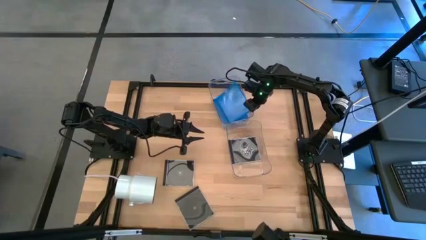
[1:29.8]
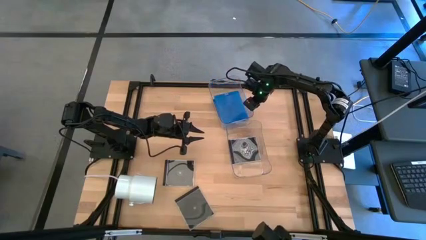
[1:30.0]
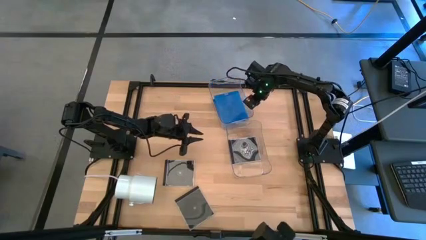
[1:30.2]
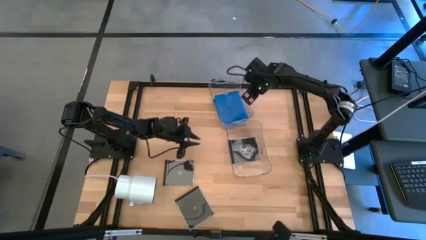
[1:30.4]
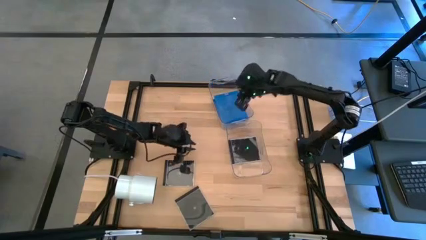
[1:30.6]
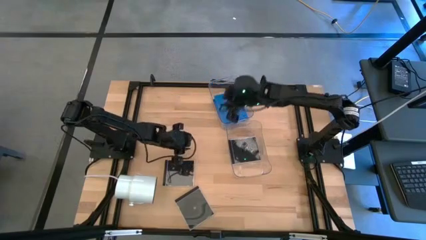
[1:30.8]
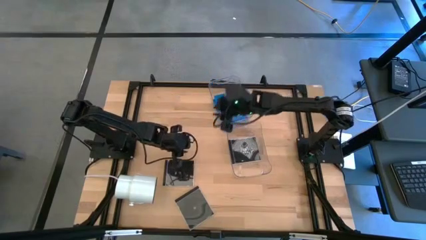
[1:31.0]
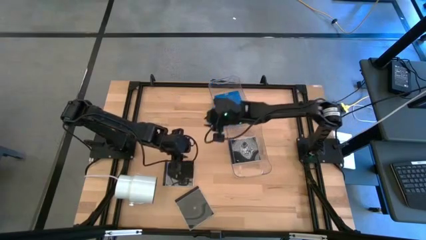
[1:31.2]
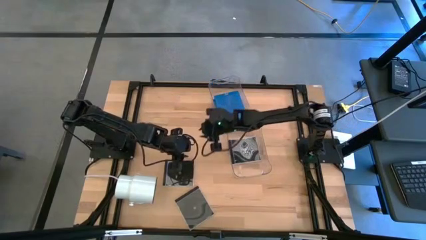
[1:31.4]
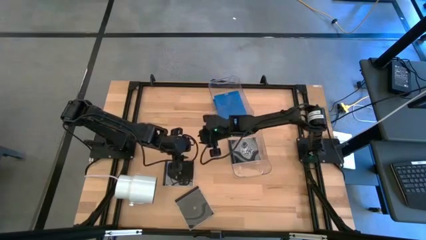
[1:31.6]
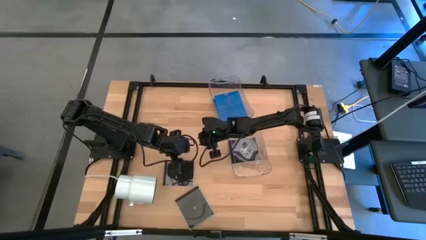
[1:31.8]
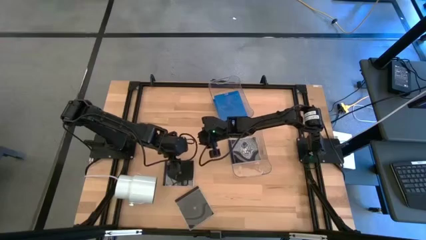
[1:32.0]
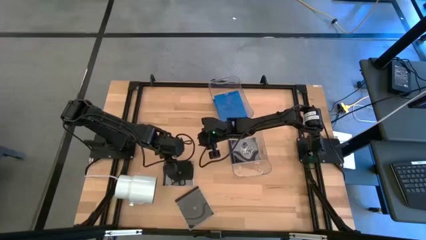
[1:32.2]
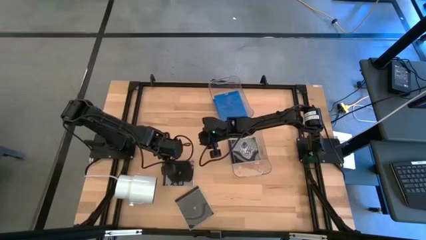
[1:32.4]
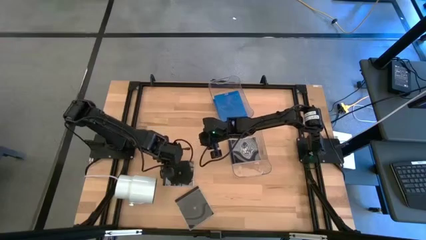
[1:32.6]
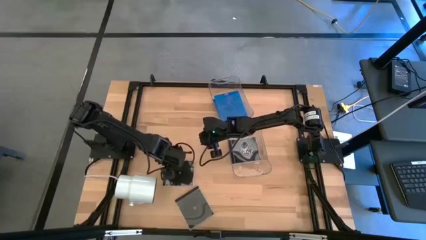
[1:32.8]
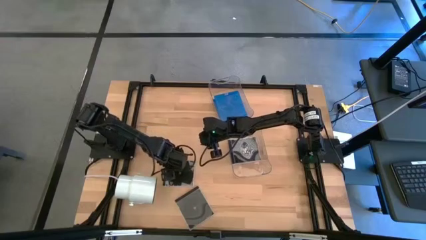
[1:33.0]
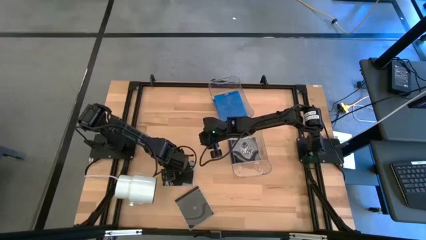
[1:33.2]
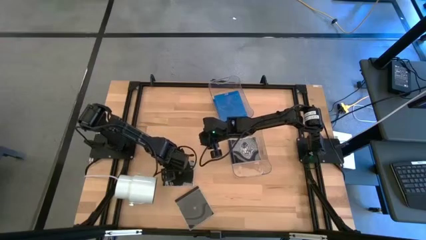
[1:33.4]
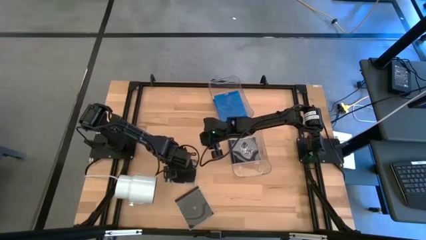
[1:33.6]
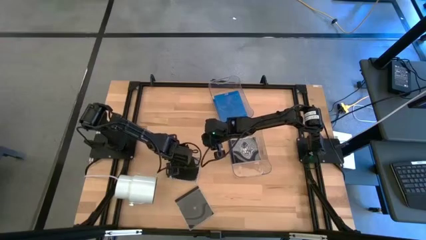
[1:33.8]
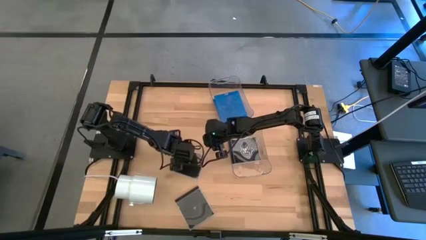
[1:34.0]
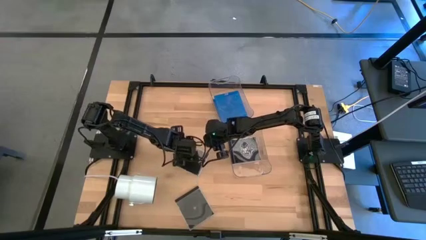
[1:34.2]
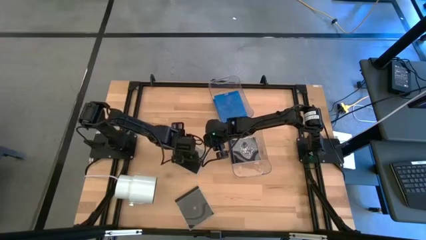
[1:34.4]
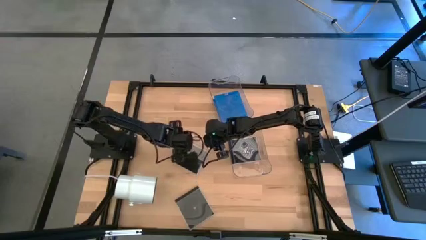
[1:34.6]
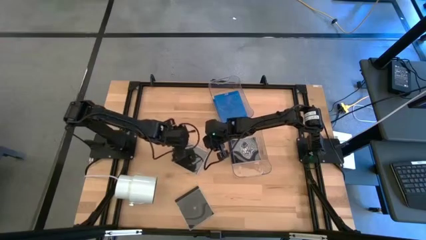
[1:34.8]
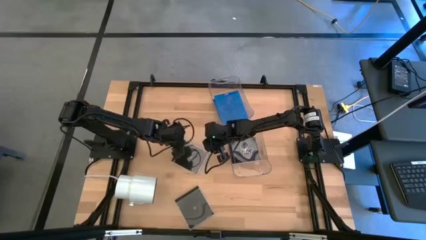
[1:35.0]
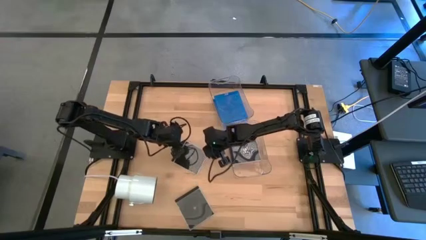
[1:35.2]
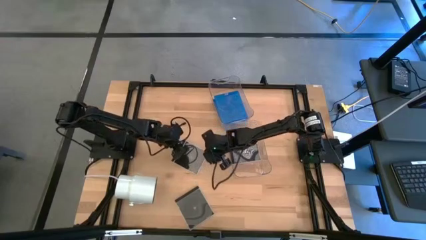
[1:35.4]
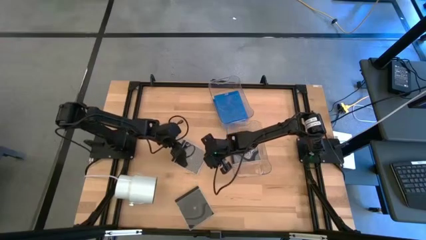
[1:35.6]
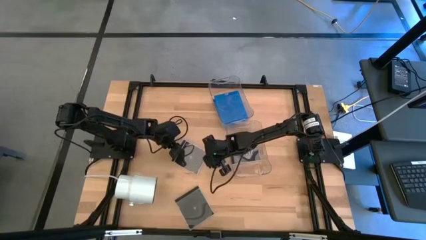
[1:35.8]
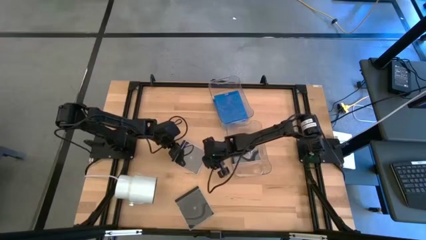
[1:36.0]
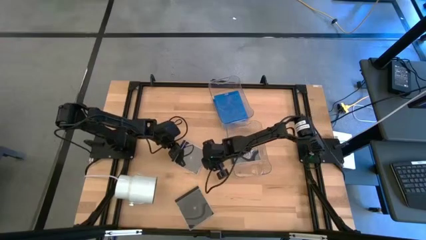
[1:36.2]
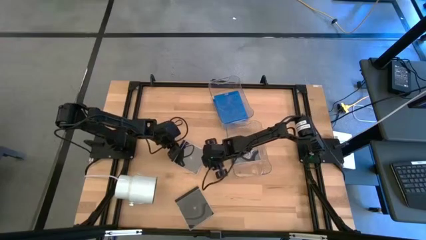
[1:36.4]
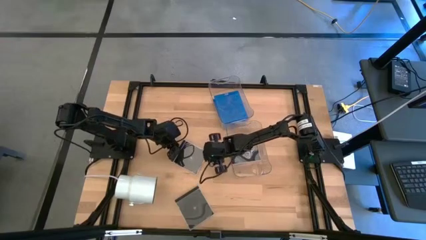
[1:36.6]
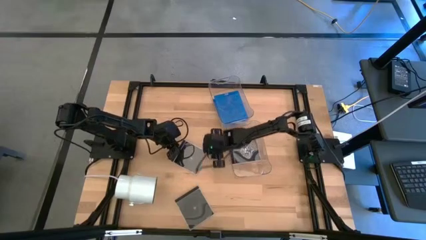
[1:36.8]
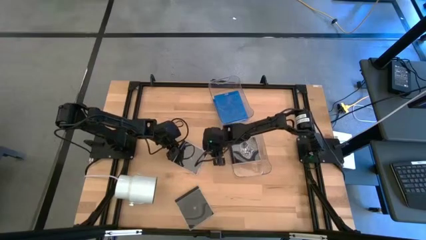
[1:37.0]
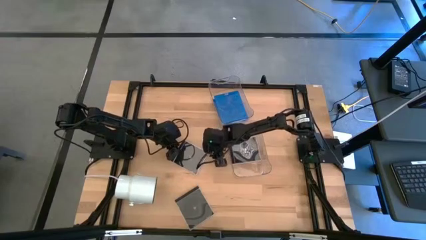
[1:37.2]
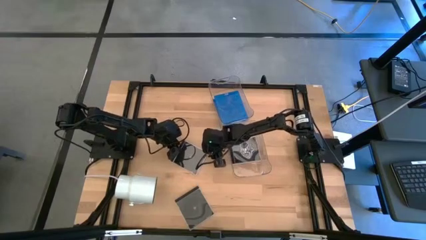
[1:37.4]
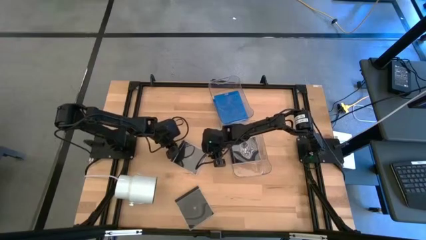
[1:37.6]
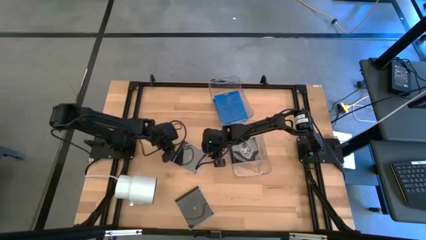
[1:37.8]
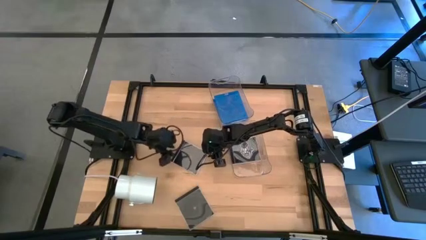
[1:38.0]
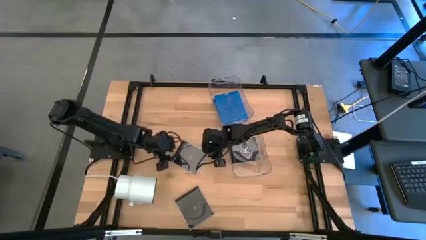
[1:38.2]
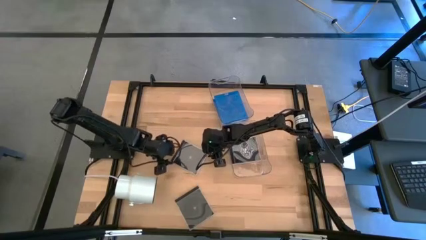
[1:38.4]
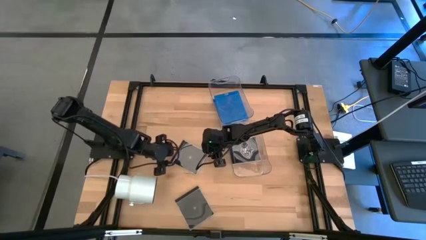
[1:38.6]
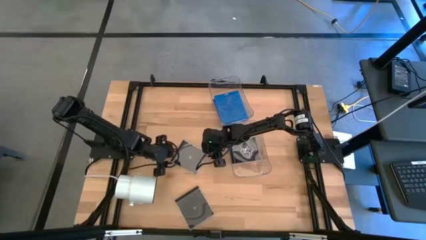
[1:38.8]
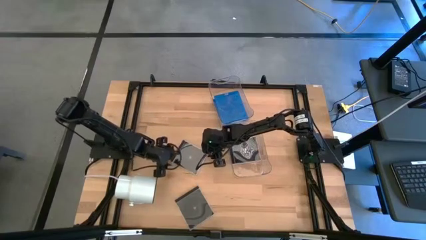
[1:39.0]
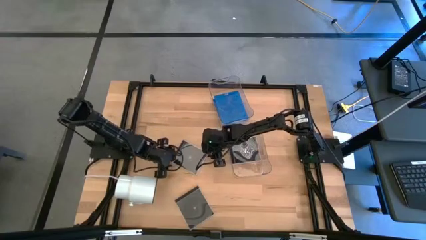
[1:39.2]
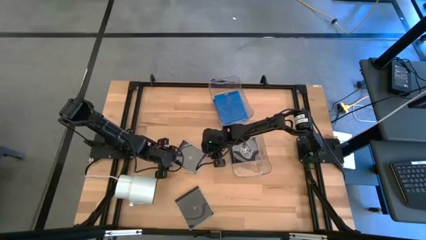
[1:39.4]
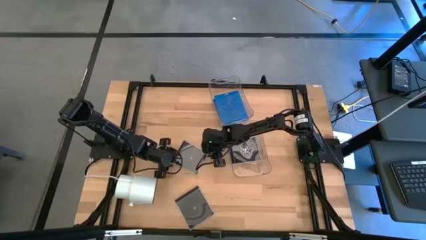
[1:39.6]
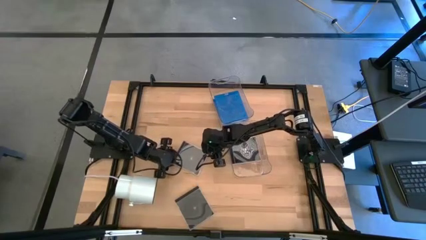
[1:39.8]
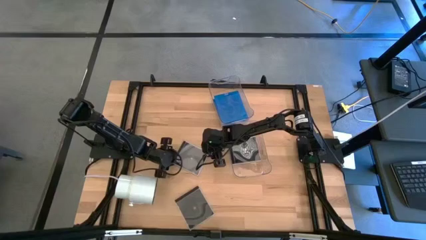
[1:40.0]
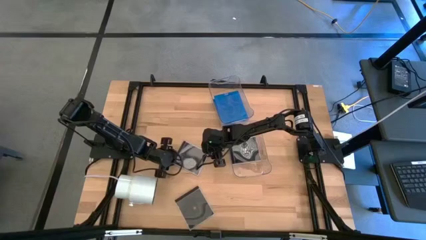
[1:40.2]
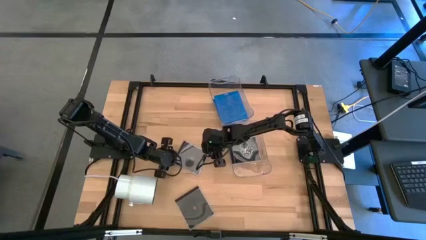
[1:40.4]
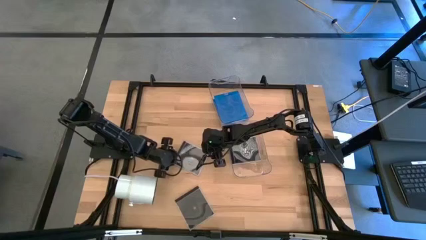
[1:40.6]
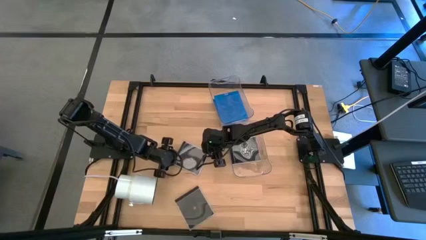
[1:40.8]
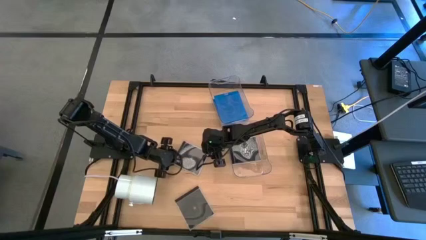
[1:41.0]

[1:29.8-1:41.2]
Task: Pick & place jewel cases by type
Put the top black CD case into the bottom transparent bin

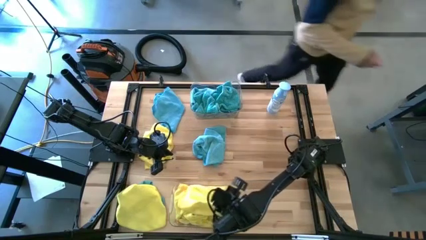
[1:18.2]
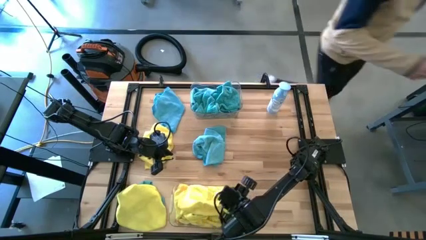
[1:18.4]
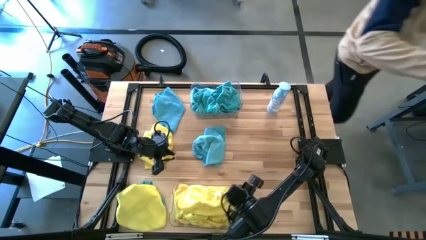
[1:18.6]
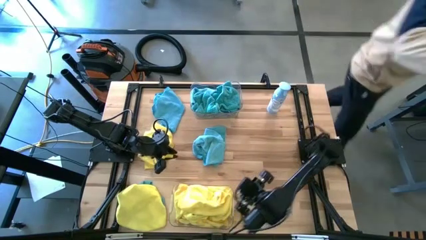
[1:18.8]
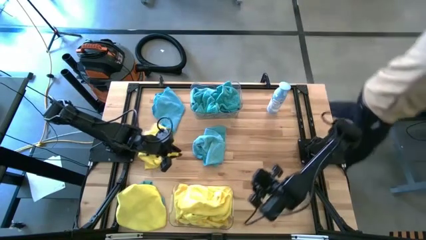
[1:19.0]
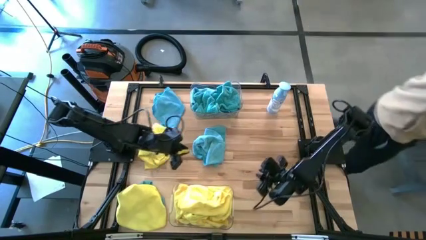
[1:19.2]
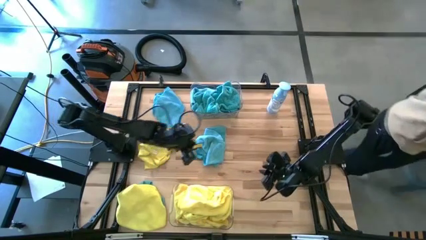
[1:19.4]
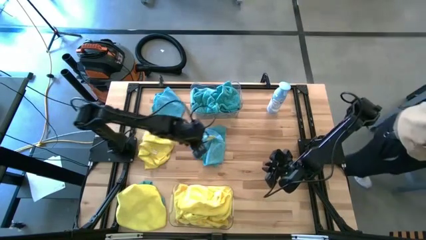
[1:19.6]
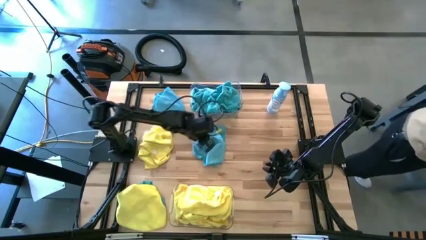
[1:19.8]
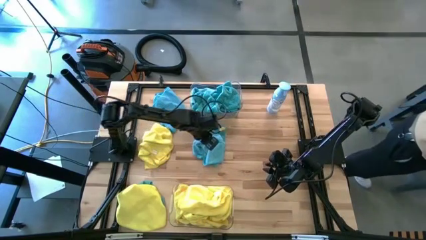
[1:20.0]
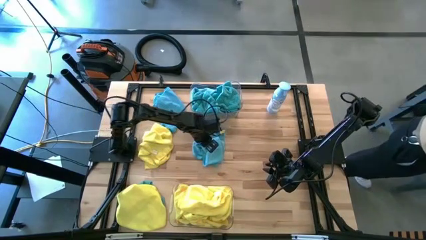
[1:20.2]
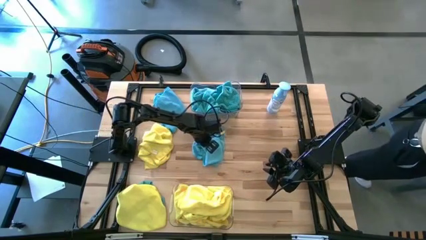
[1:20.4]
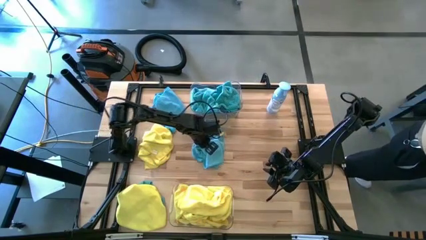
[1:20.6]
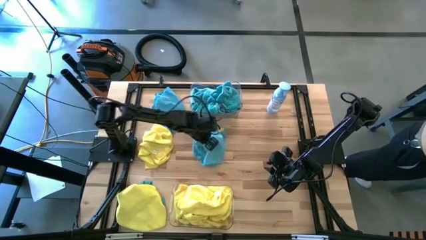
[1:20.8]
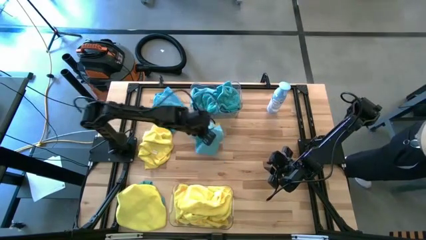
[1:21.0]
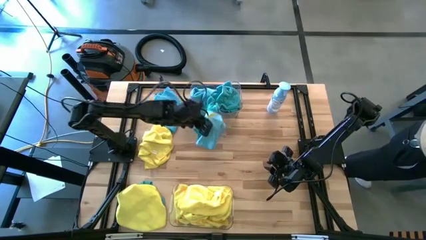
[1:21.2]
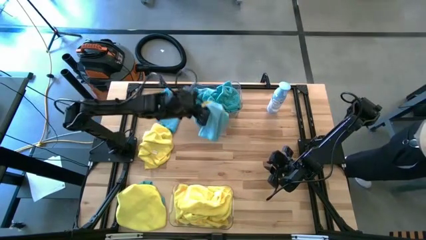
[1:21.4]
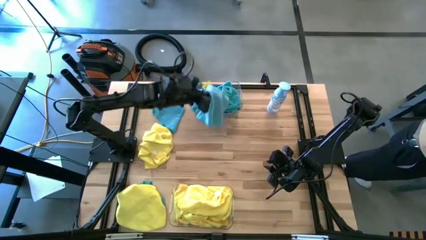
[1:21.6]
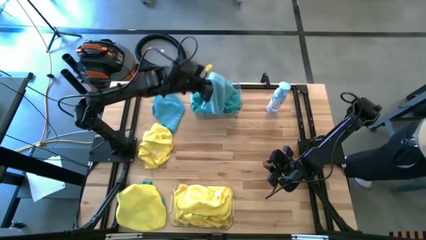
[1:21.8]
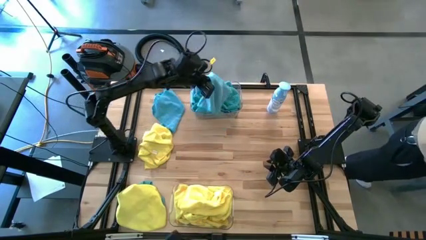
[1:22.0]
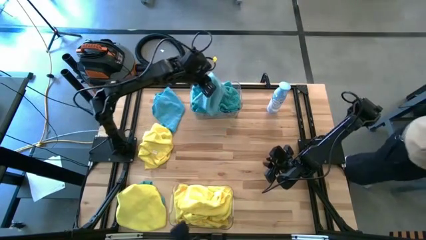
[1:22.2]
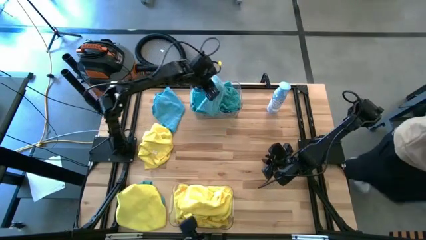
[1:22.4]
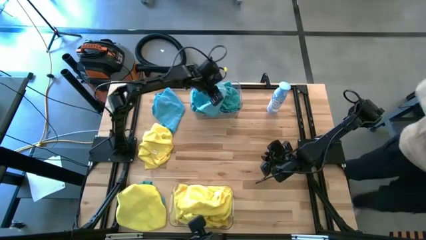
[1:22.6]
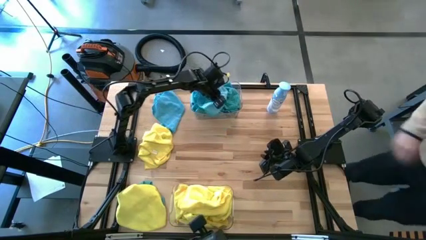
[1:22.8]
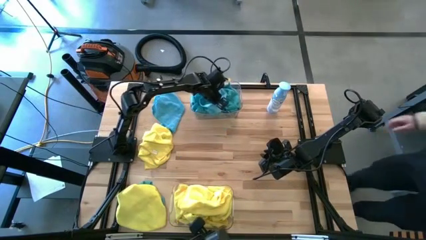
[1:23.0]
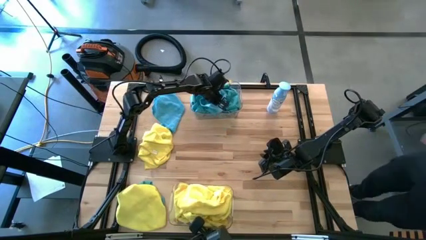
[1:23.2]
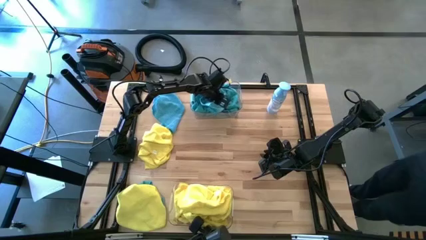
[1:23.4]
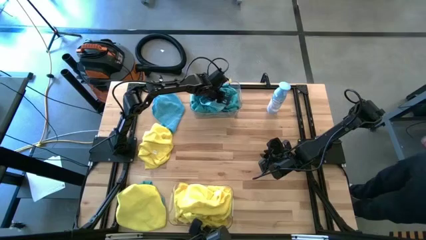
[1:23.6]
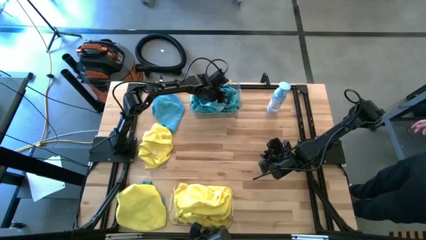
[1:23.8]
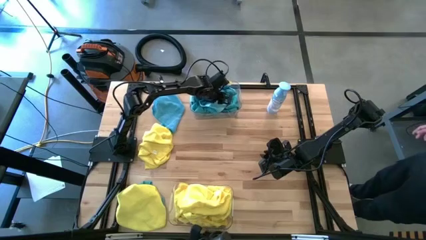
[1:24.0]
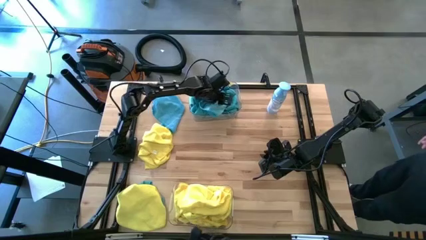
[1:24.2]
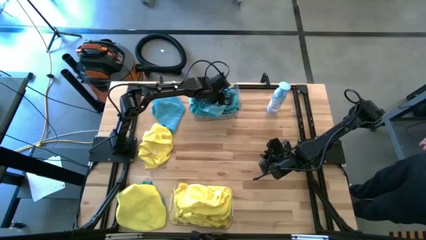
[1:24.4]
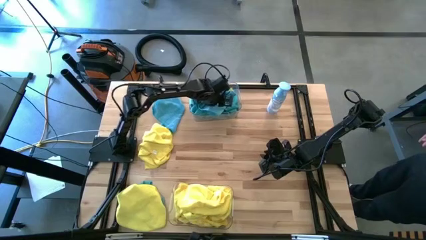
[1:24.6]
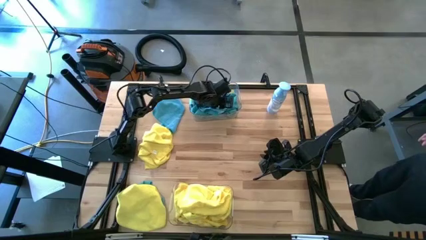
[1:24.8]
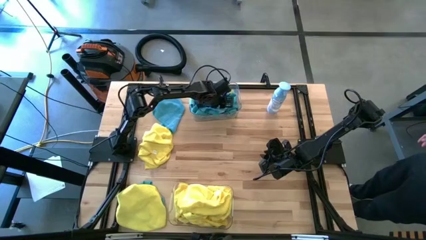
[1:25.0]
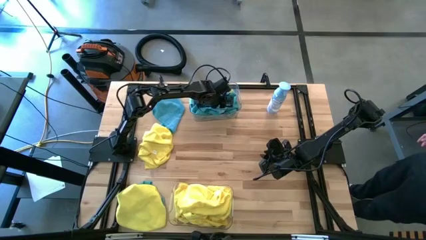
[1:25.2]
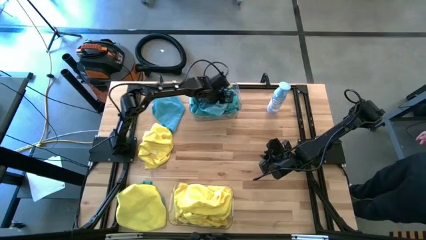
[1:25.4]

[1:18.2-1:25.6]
Task: Sort microfiber towel by color & place in baskets
Put the blue microfiber towel into the top transparent bin
